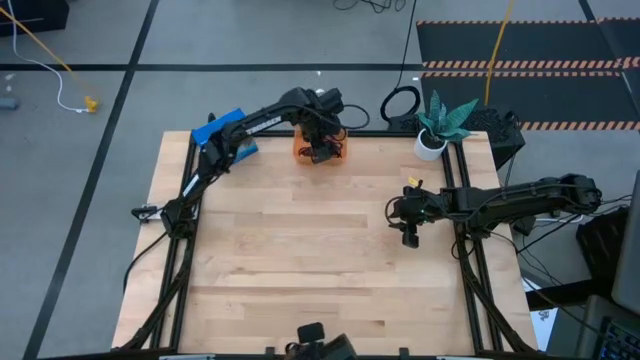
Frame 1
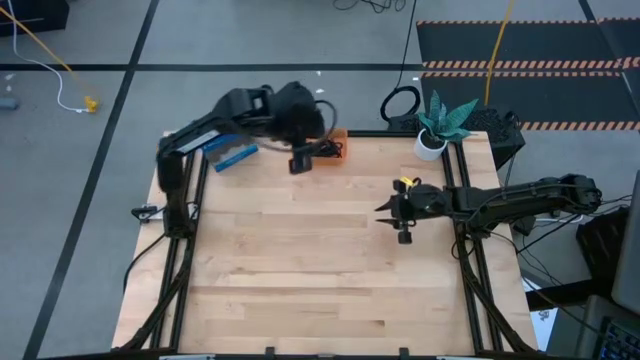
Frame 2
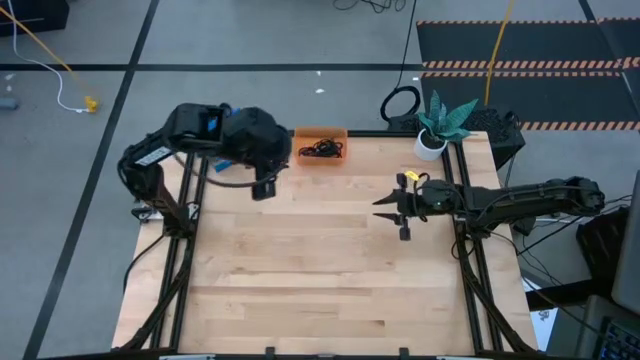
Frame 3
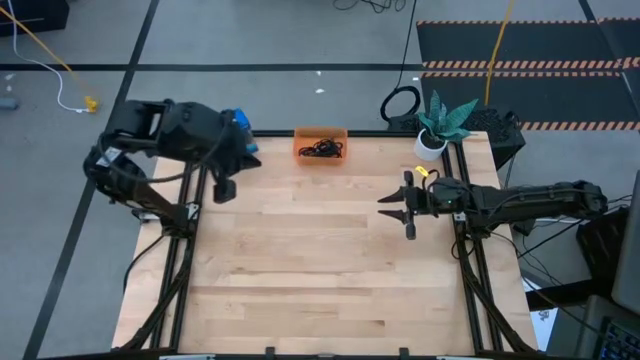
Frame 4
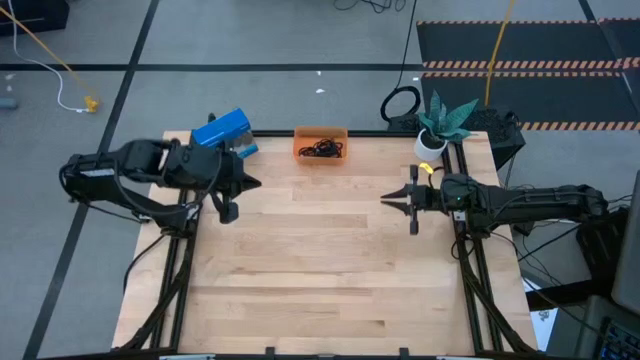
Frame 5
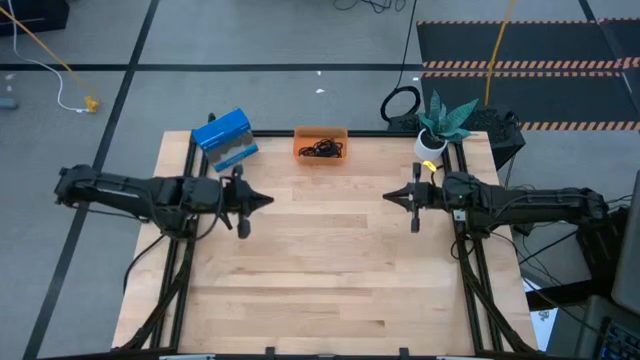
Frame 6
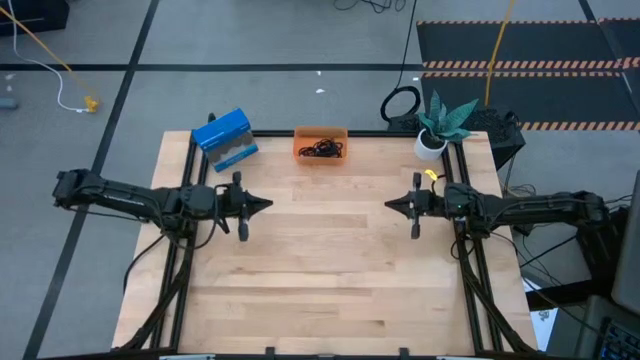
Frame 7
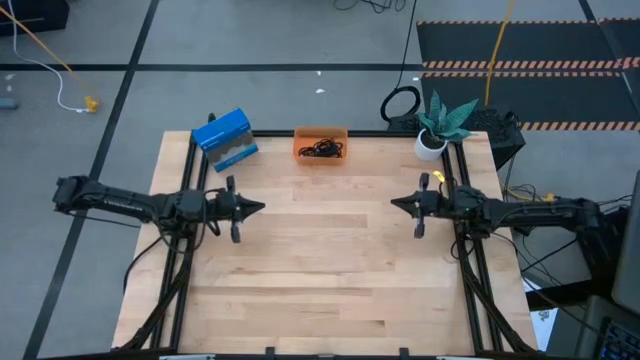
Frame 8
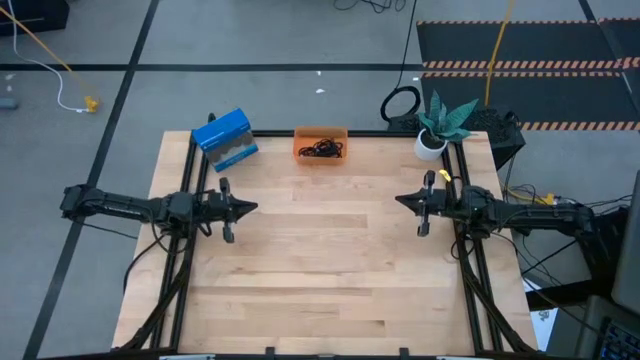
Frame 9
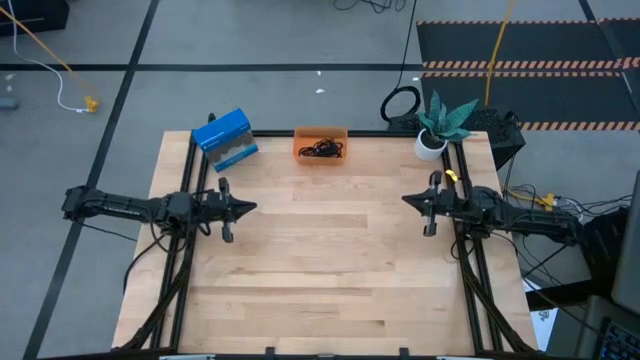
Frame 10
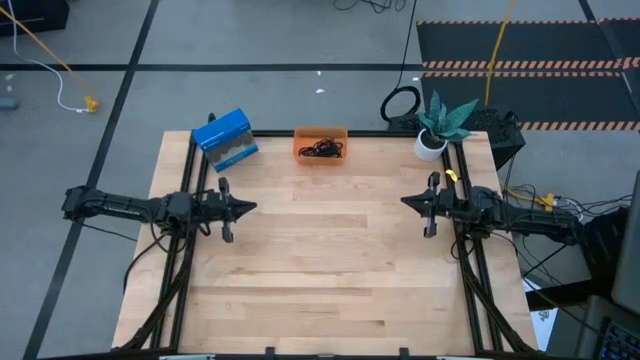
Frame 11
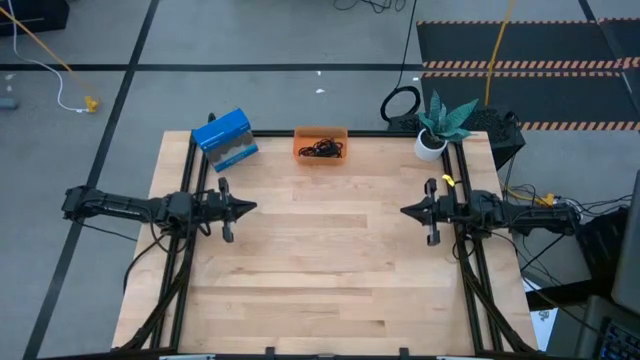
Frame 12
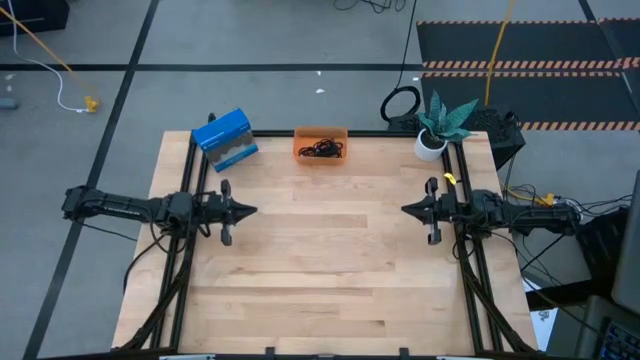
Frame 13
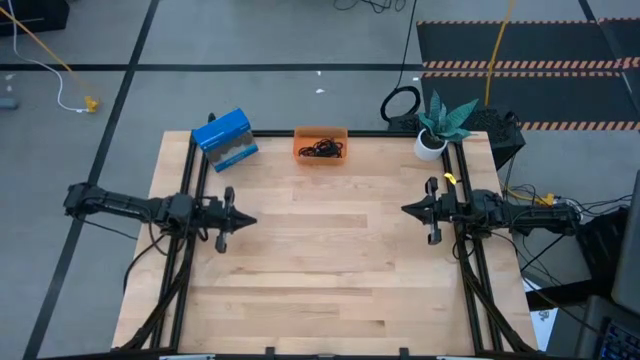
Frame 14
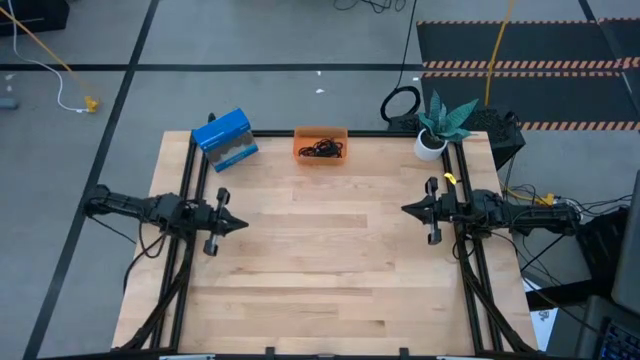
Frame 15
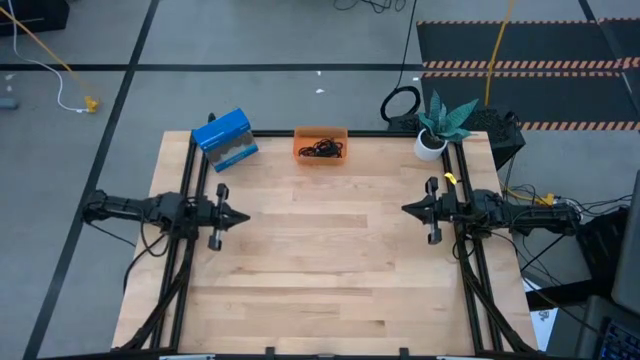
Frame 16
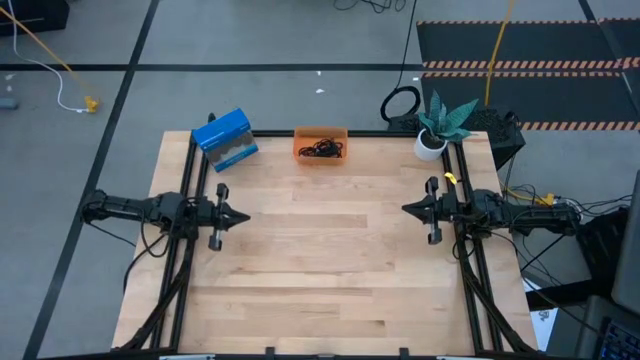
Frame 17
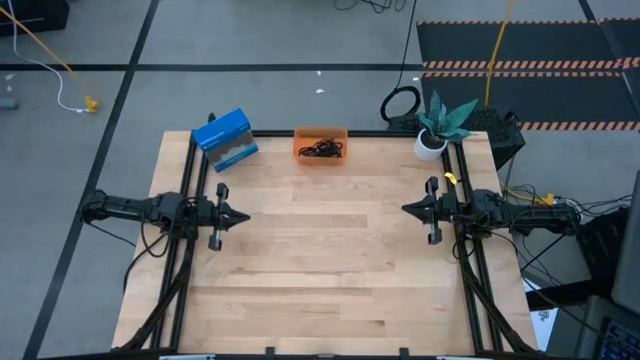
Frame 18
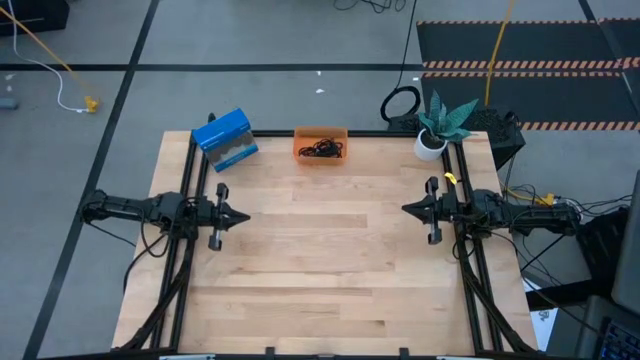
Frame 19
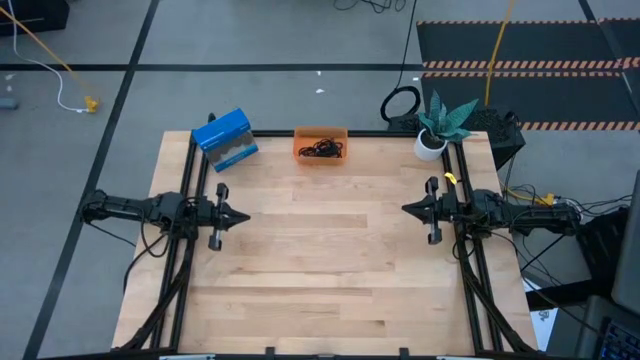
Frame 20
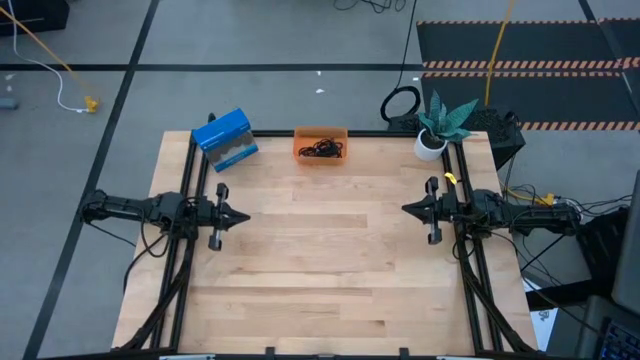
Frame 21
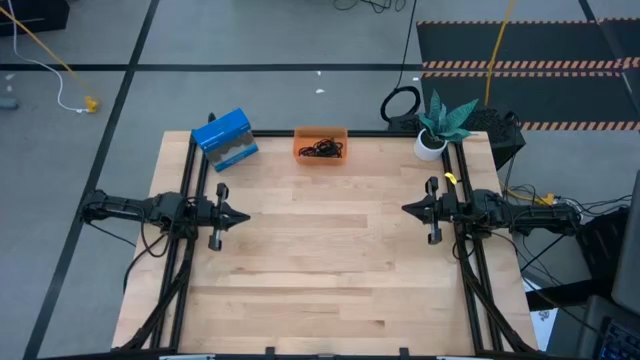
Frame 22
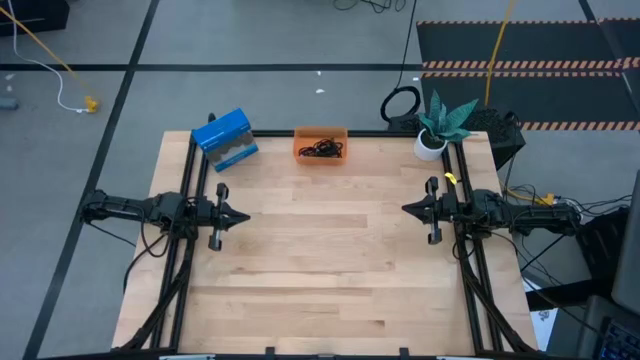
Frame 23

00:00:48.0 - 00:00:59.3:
Task: Pick and place USB-C Cables
Return to Home Position
